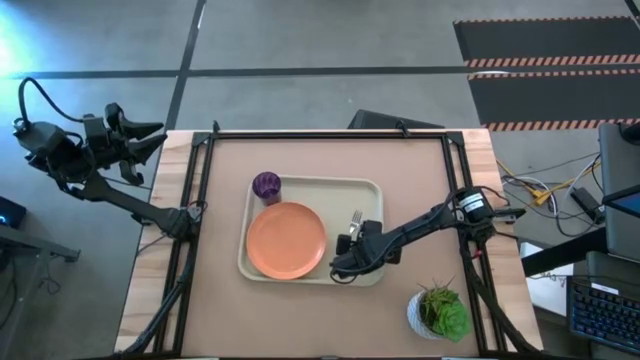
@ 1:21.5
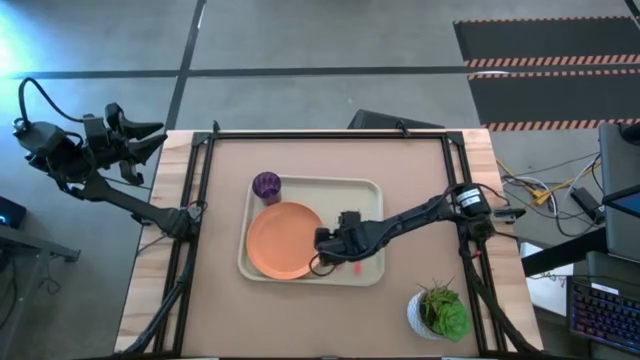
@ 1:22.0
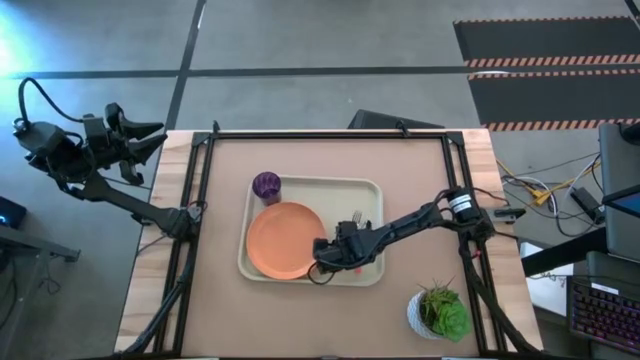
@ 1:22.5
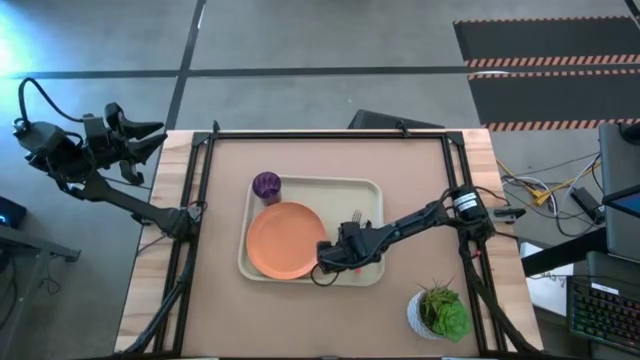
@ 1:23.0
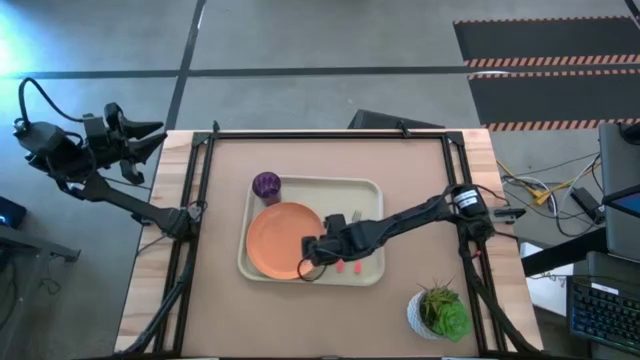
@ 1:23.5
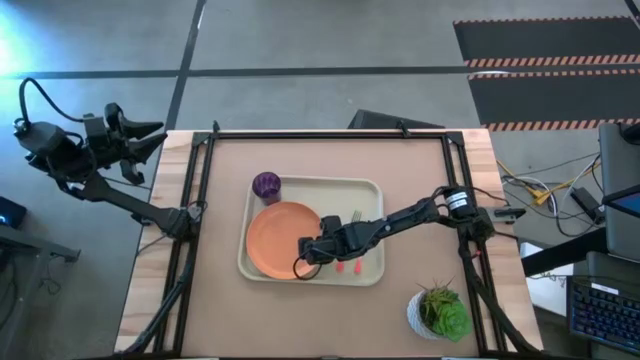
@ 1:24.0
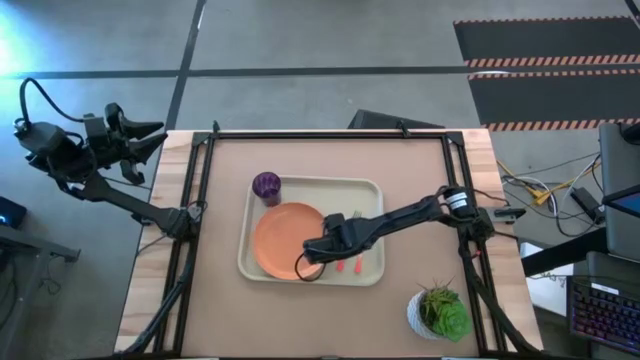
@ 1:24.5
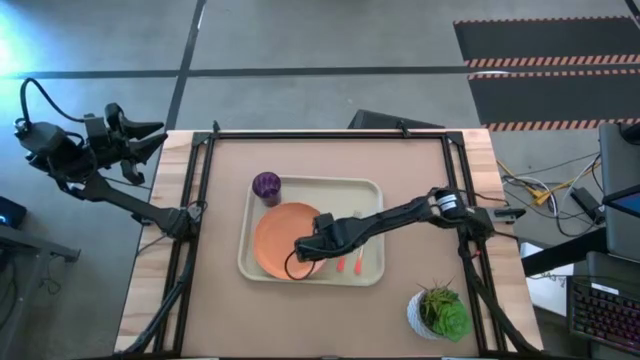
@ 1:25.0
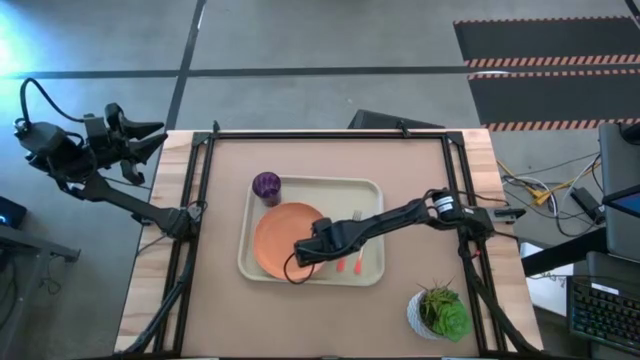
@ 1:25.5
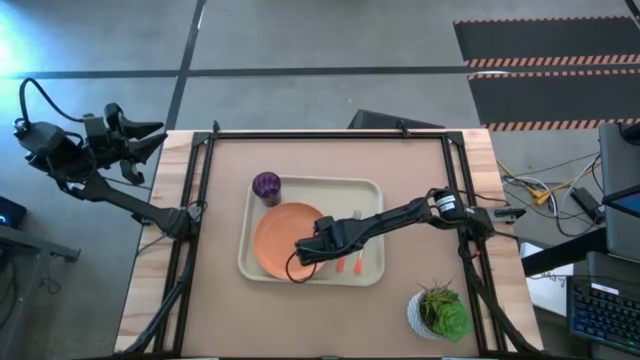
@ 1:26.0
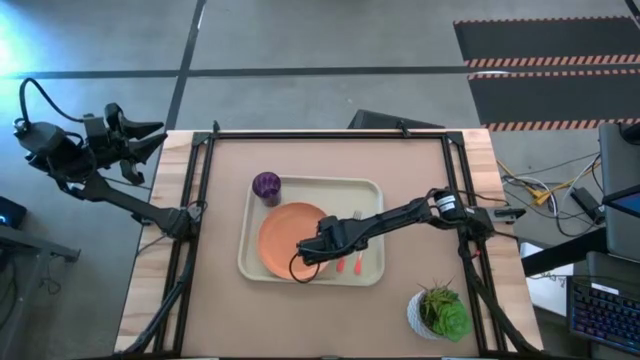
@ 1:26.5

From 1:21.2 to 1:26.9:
Task: Pick and place plate/cup/fork/spoon on tray
Adjust the orange plate

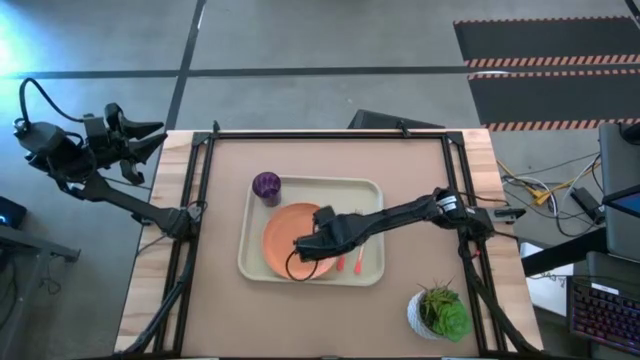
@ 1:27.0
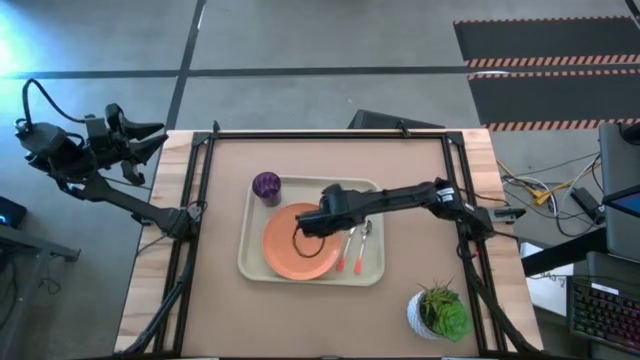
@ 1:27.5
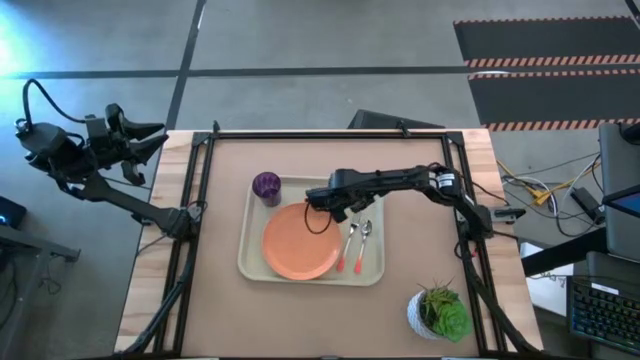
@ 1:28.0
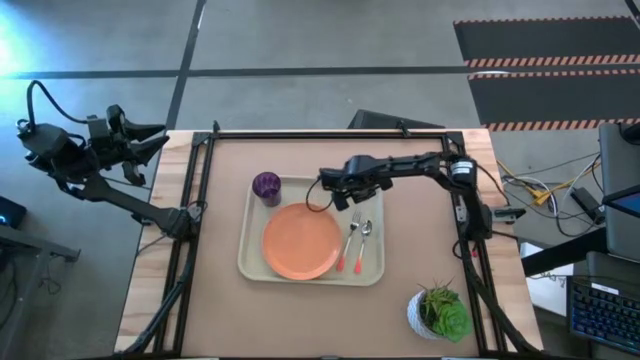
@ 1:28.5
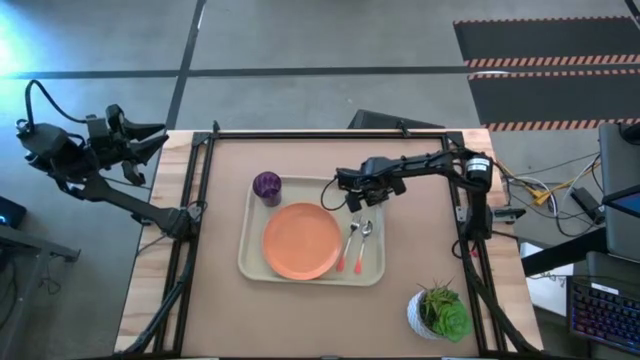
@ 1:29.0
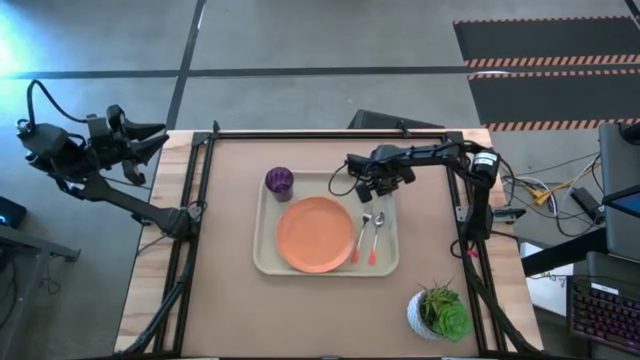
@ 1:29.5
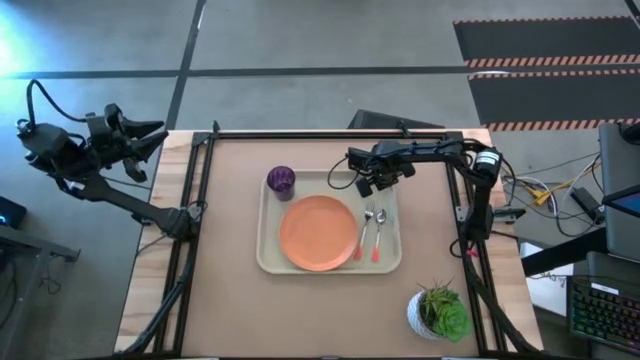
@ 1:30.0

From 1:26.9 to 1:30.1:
Adjust the beige tray

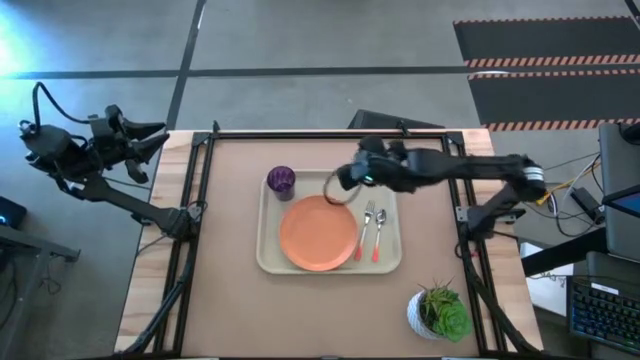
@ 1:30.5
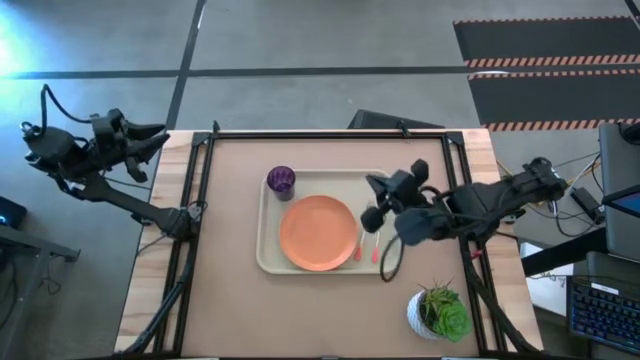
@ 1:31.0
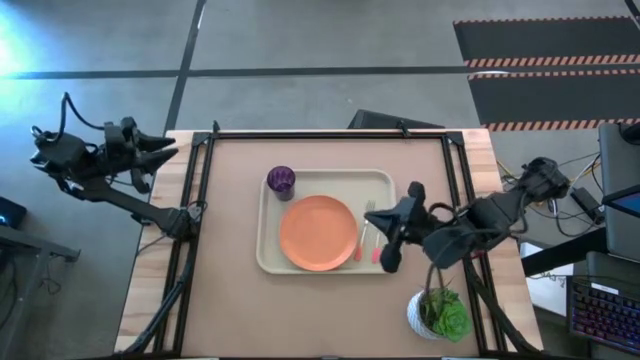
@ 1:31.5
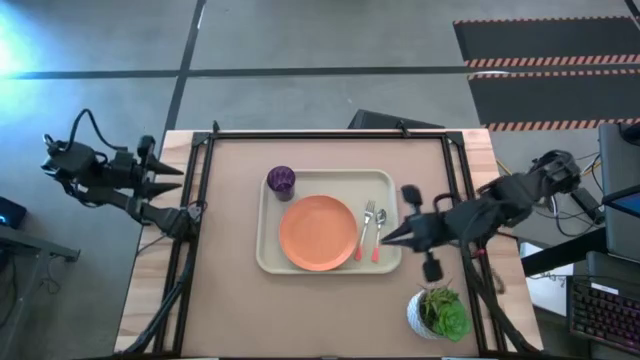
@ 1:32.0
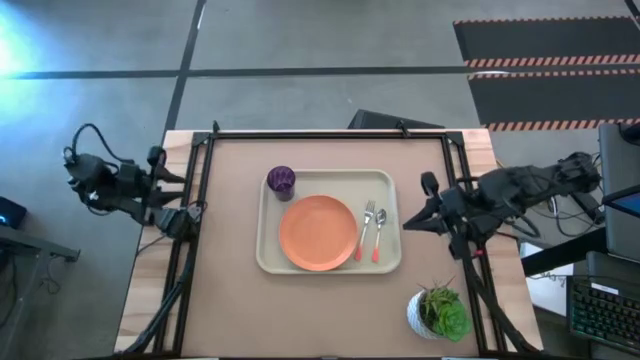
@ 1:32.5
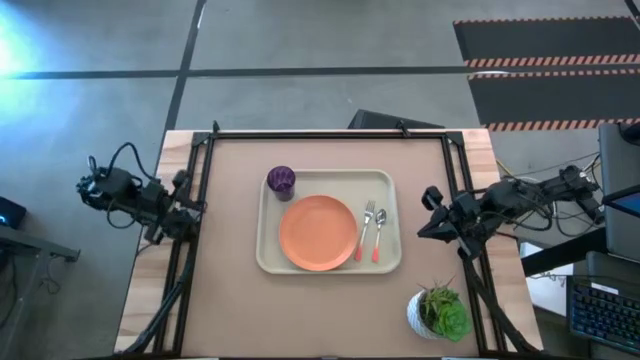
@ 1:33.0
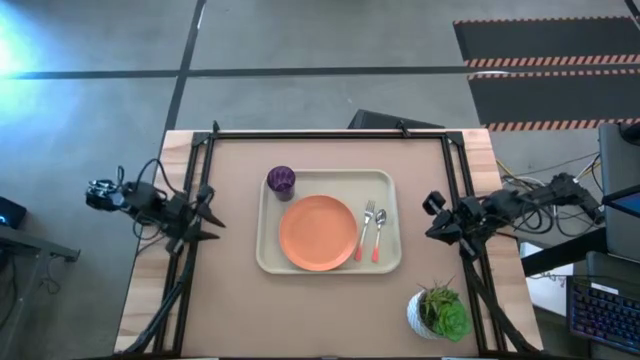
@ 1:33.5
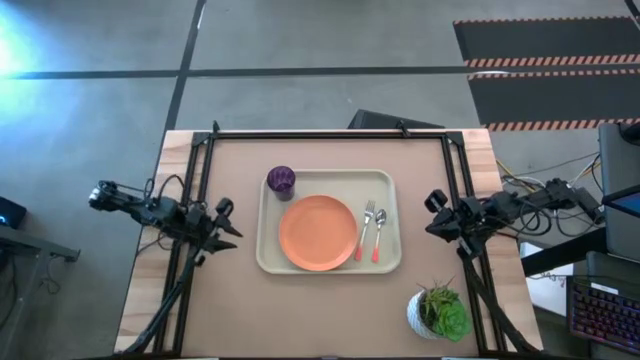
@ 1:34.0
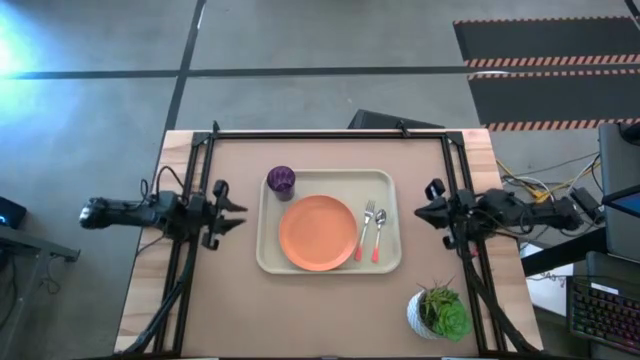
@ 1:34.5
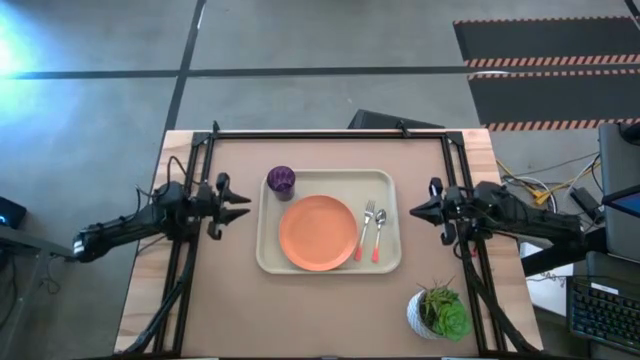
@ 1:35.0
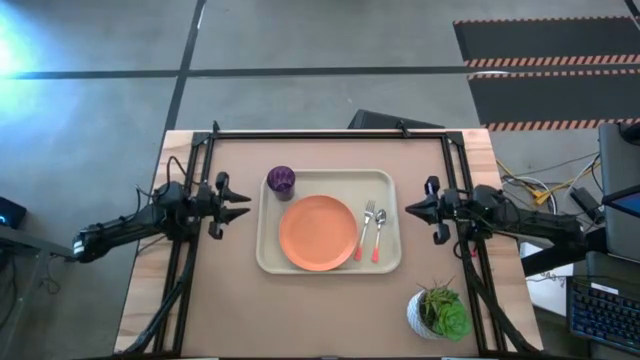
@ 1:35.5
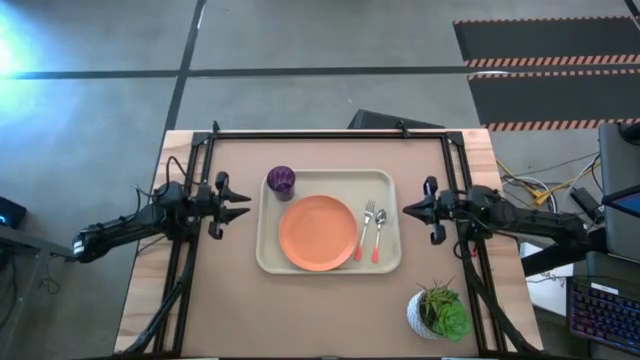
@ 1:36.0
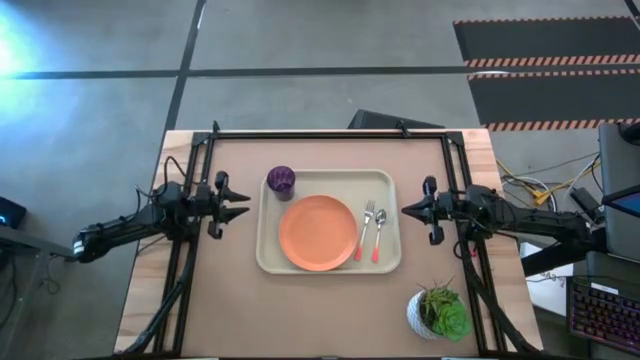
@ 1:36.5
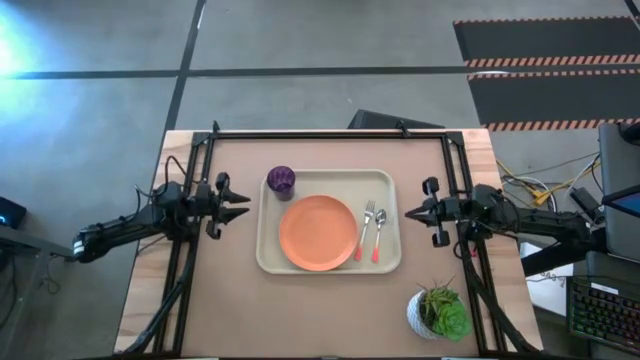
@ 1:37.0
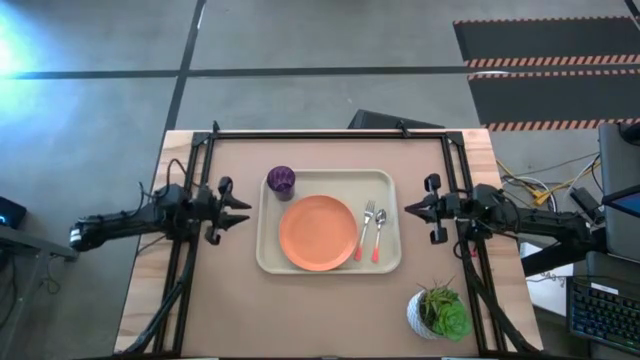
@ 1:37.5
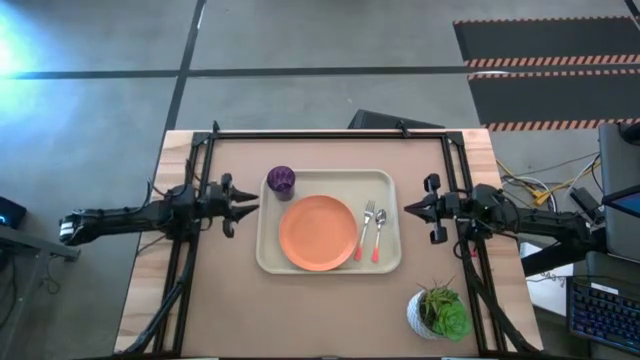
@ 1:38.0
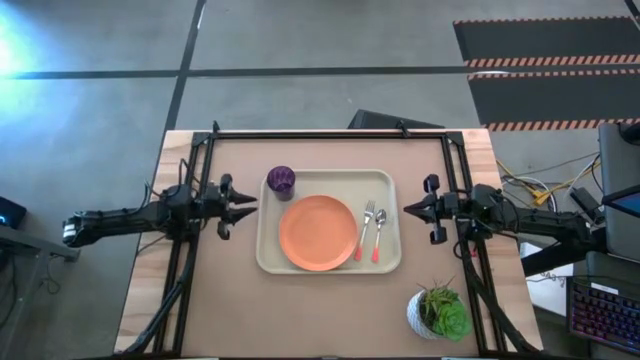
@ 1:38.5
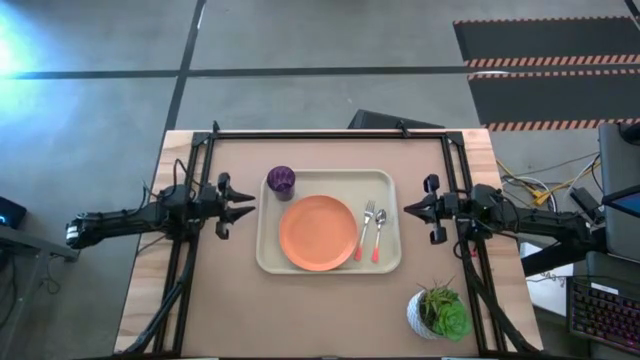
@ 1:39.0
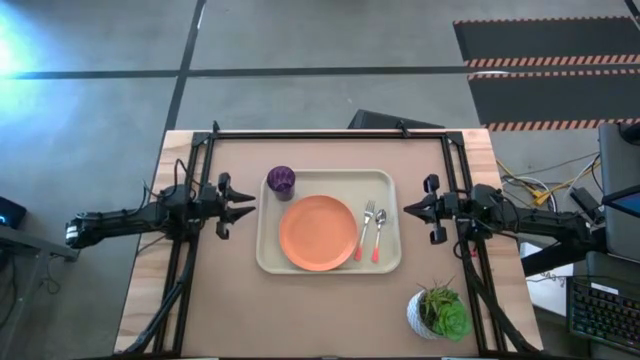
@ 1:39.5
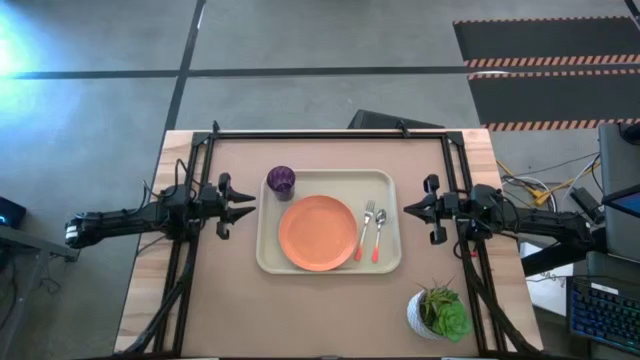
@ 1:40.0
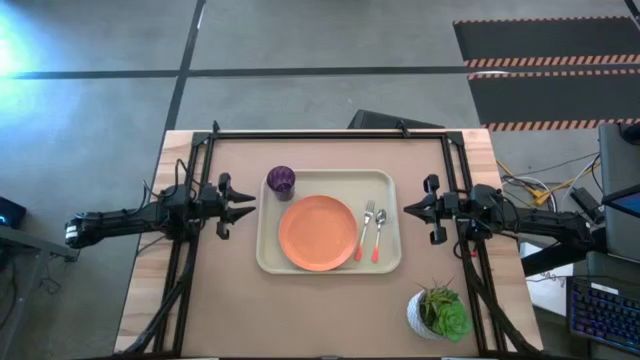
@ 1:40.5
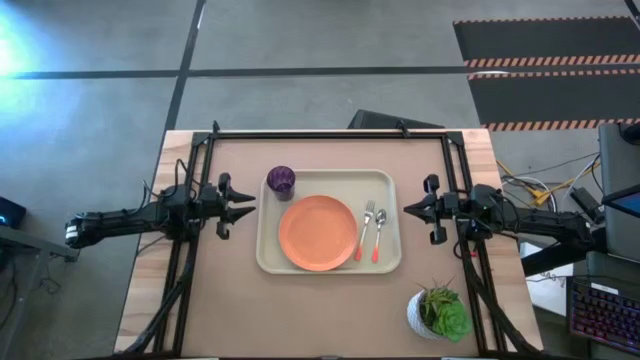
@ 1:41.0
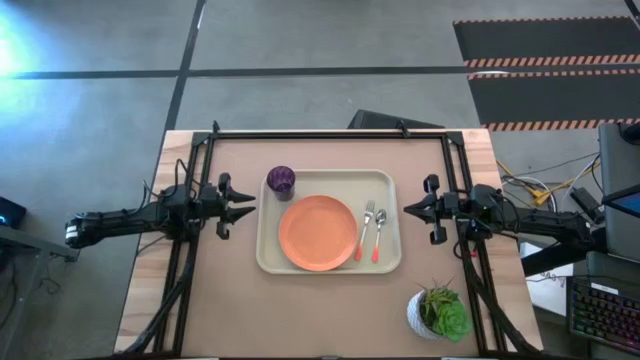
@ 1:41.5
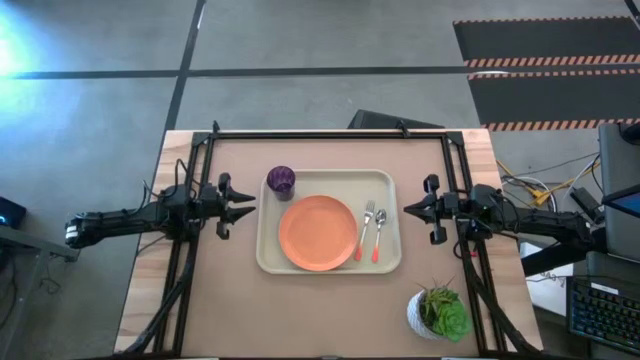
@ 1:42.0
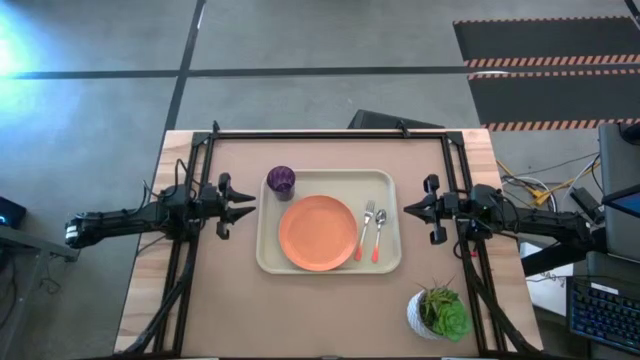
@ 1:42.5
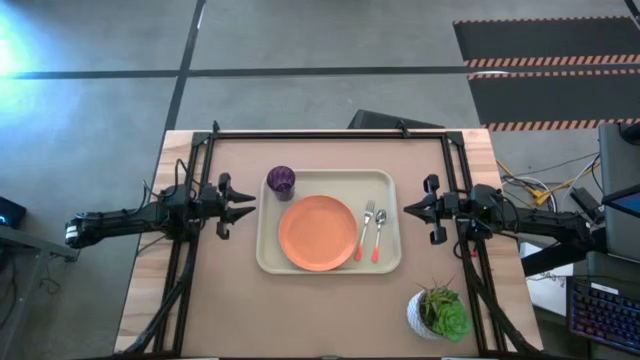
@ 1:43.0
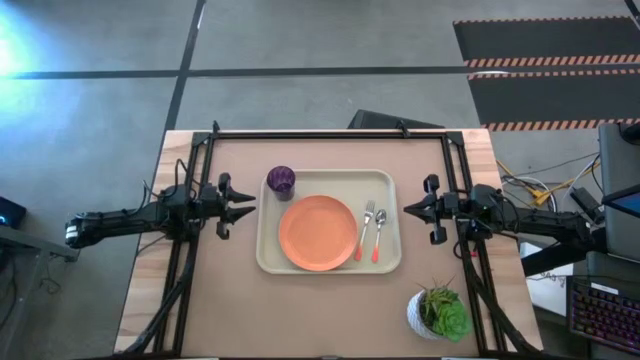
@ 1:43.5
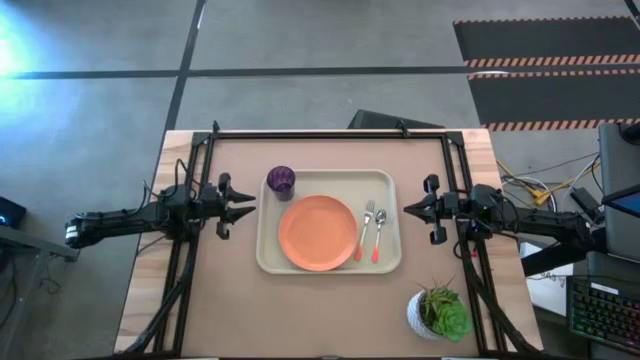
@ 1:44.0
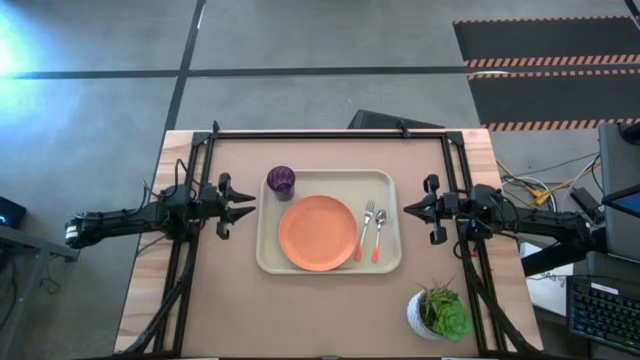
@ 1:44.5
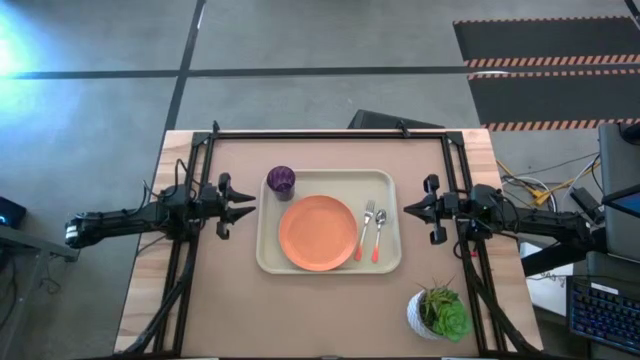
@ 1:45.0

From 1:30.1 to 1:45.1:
Return to Home Position
